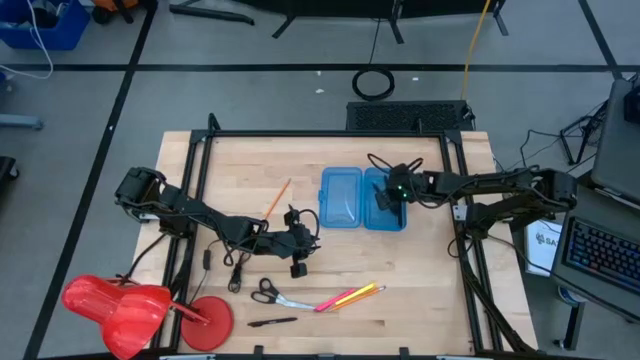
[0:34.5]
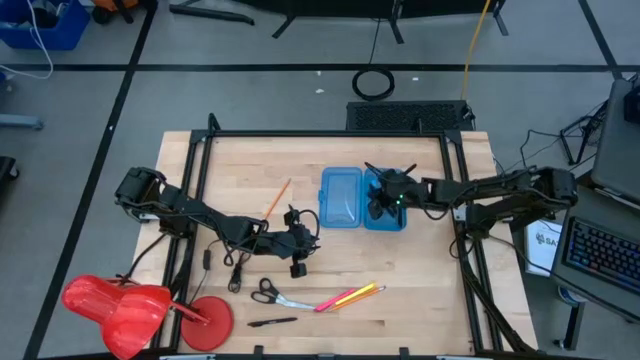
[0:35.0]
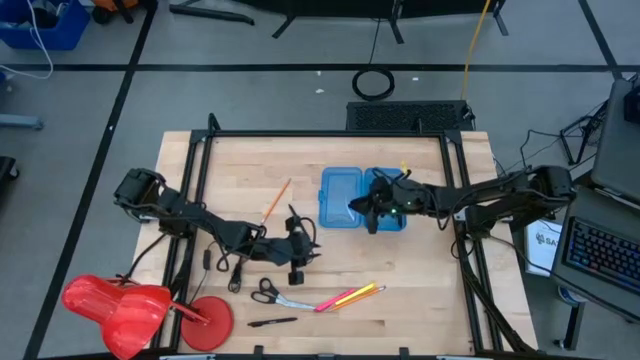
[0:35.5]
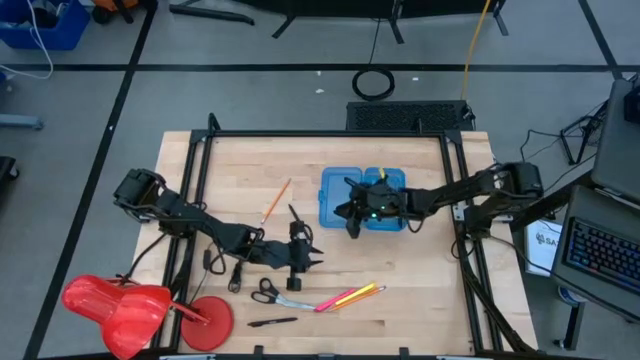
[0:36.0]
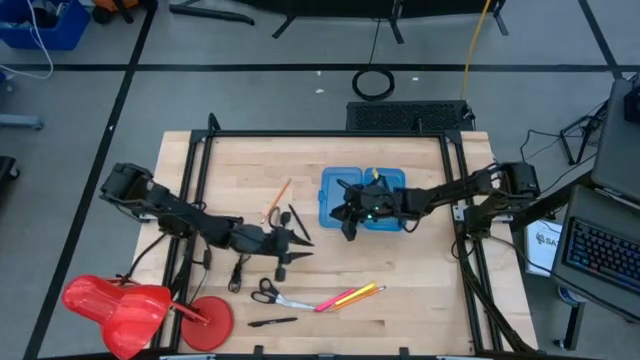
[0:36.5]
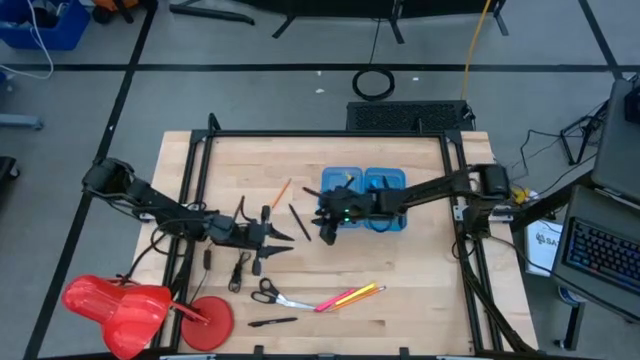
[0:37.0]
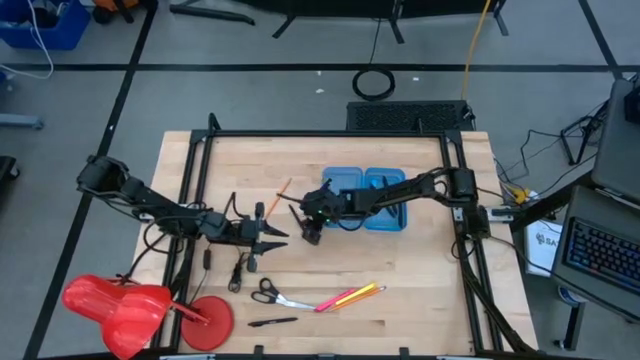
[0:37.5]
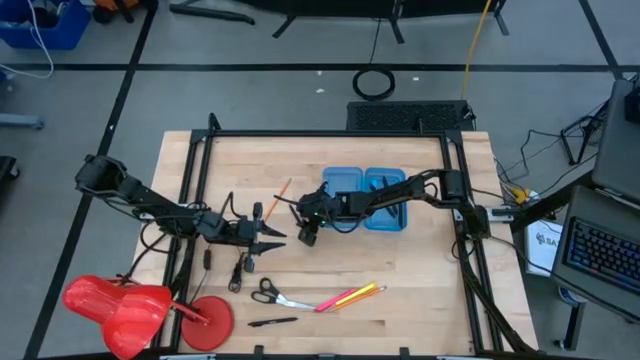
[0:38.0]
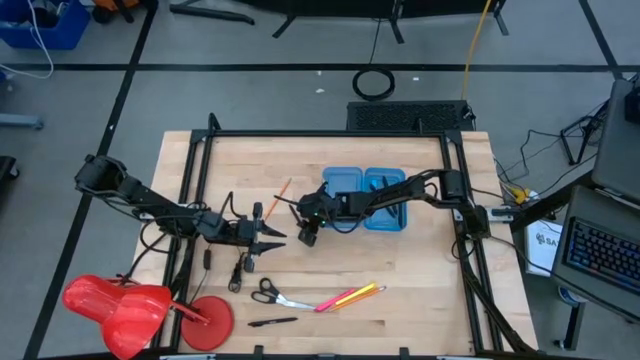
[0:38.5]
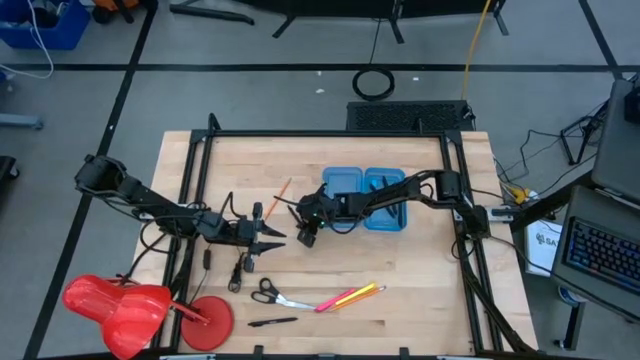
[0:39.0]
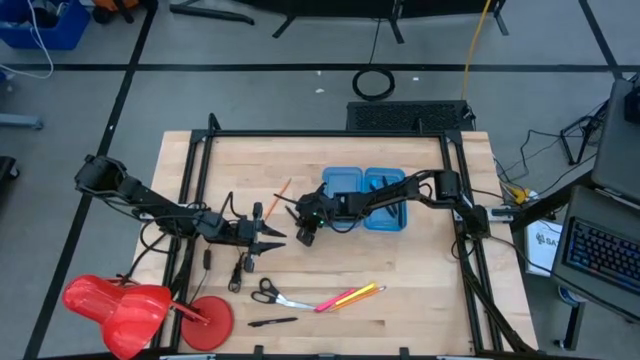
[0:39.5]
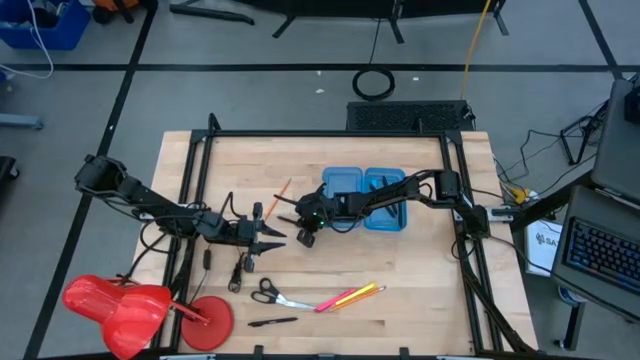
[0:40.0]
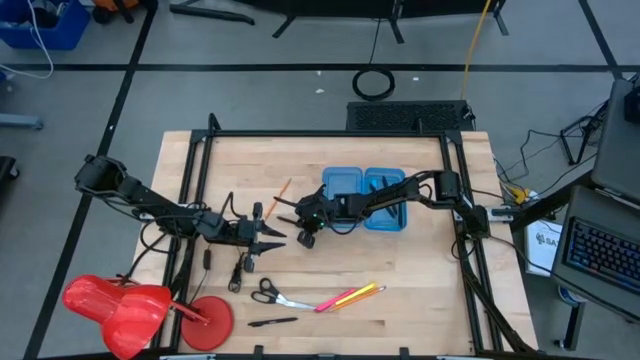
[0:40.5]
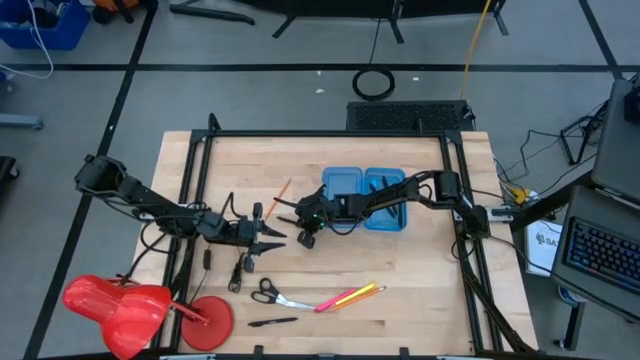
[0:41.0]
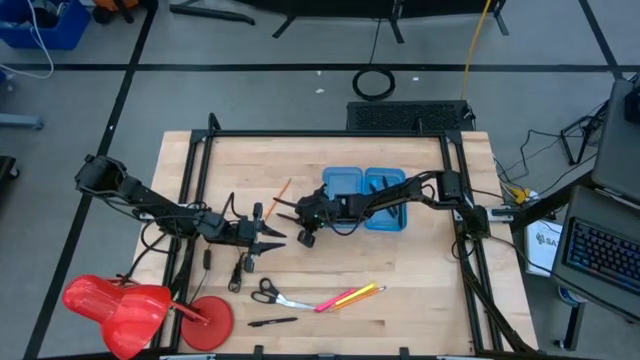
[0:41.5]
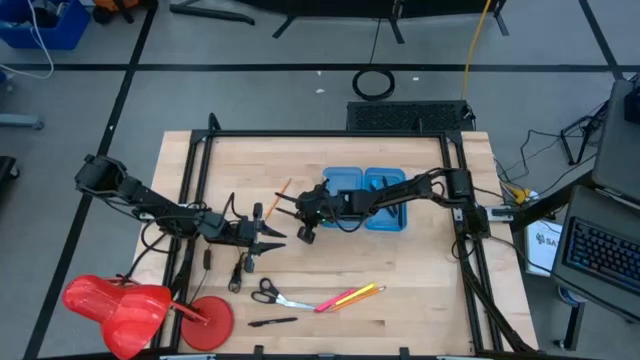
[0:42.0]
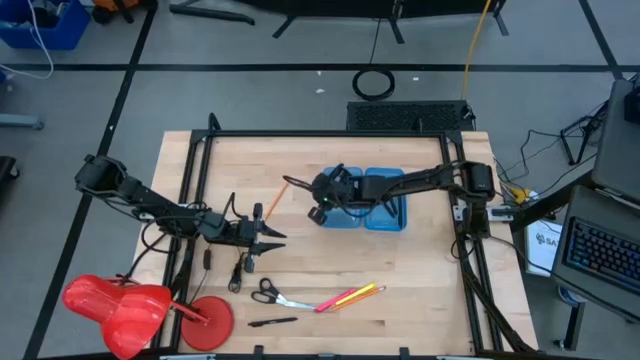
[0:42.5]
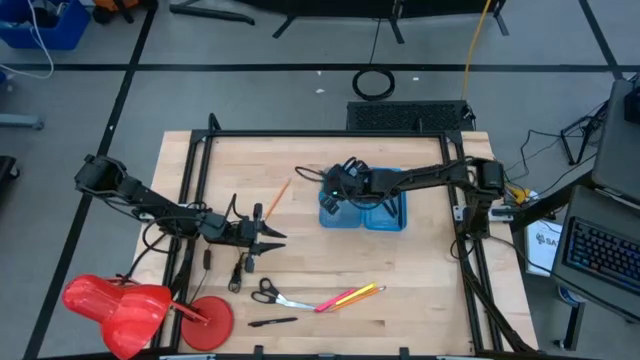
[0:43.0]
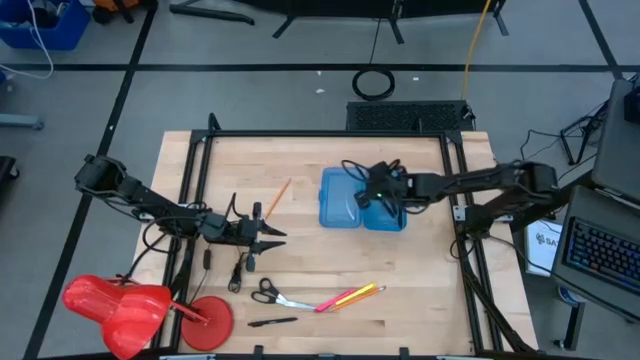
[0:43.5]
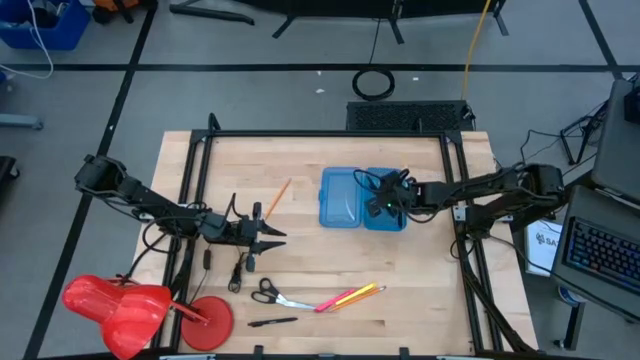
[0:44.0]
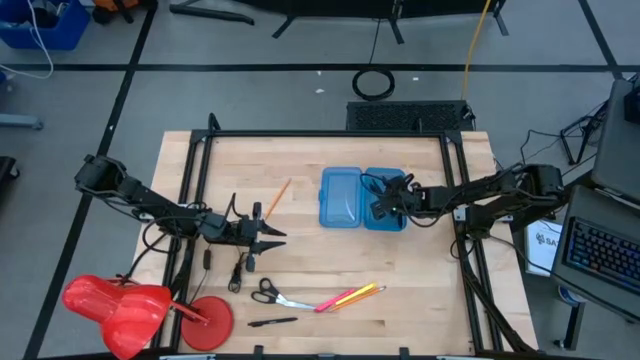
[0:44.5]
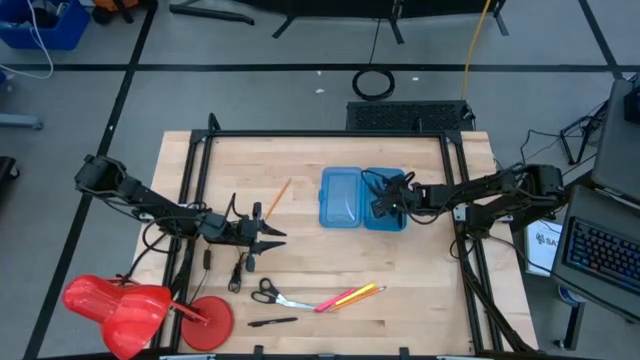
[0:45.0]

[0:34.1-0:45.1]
Task: Pick & place school supplies into a supply box
Put the black pen into the blue supply box

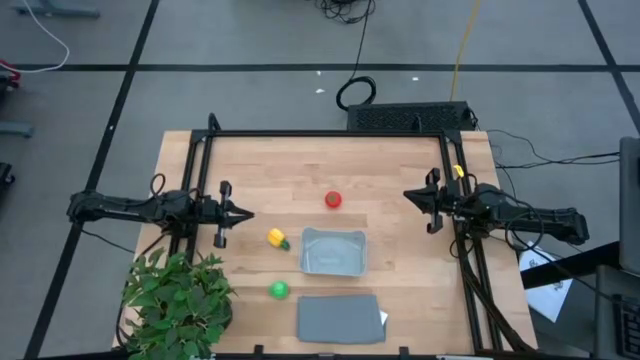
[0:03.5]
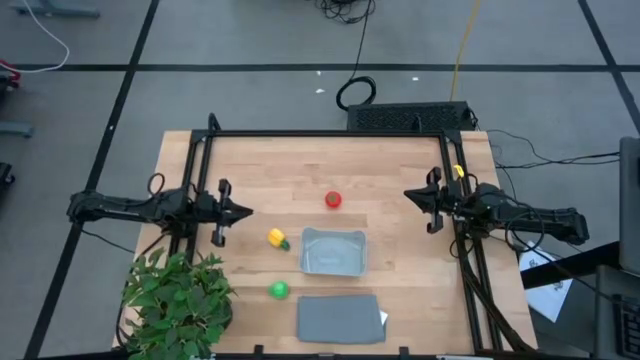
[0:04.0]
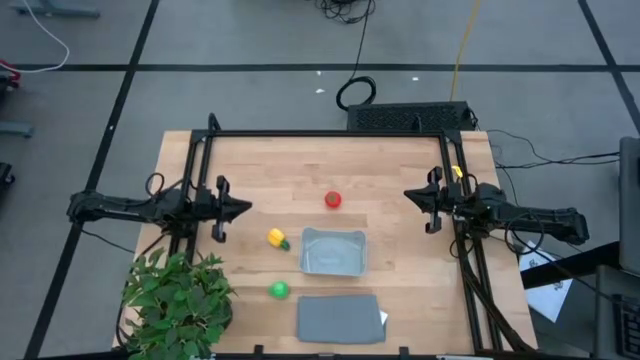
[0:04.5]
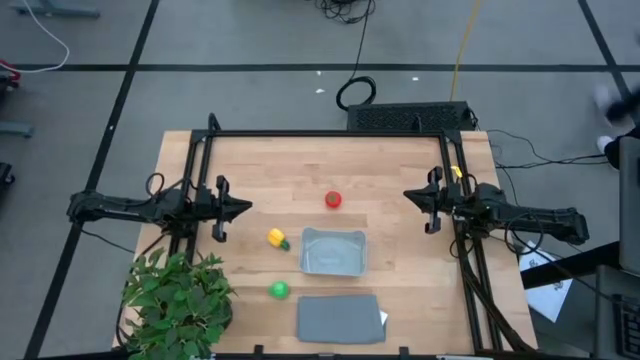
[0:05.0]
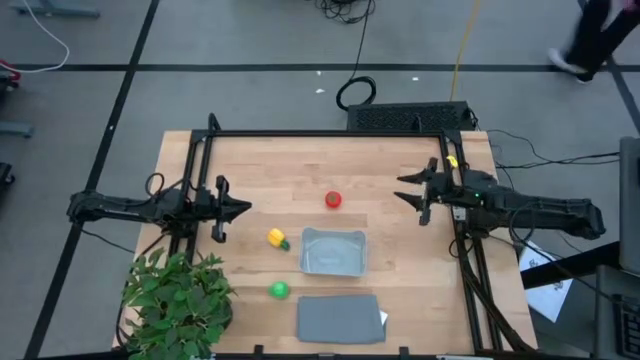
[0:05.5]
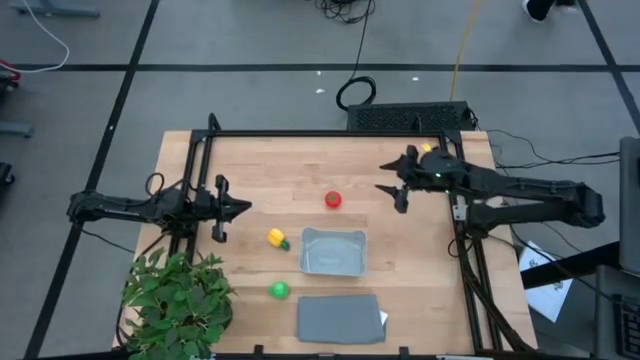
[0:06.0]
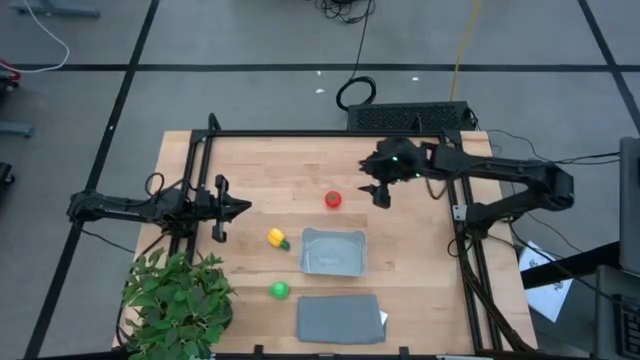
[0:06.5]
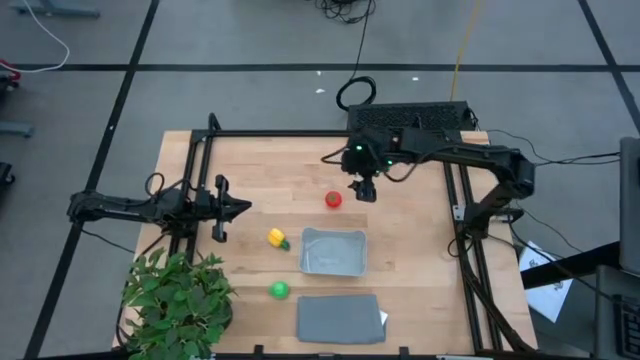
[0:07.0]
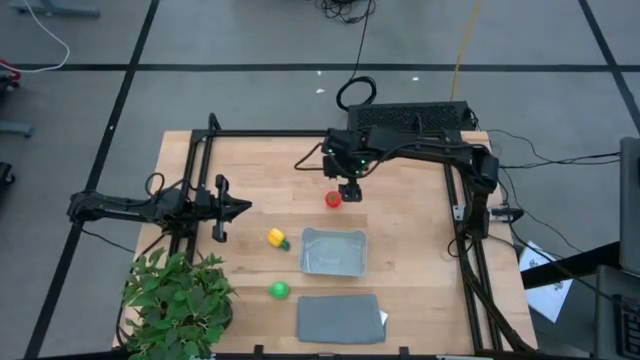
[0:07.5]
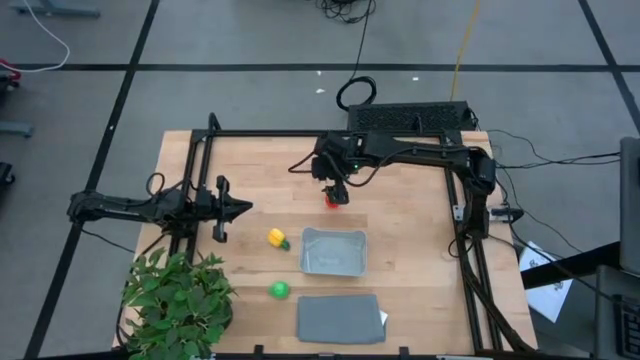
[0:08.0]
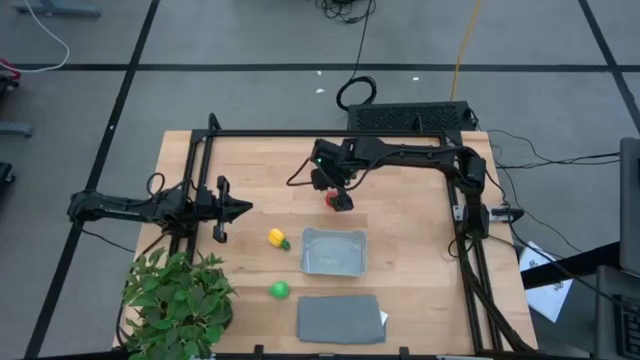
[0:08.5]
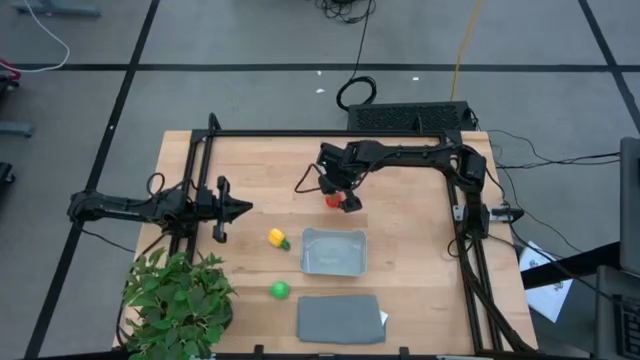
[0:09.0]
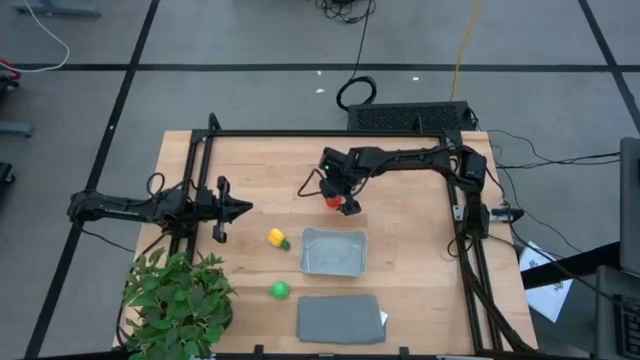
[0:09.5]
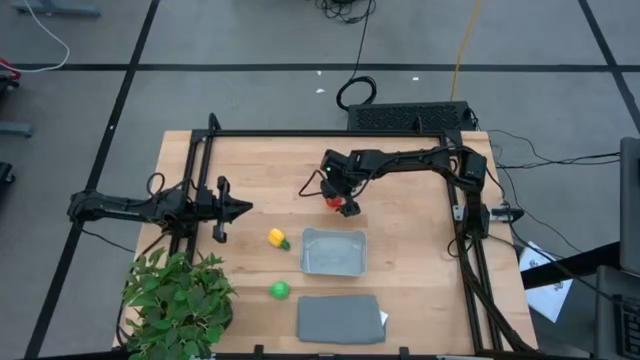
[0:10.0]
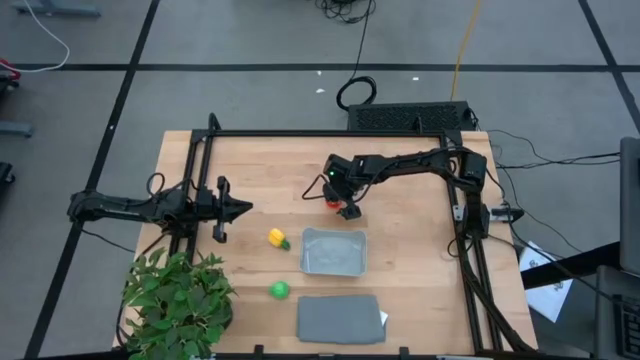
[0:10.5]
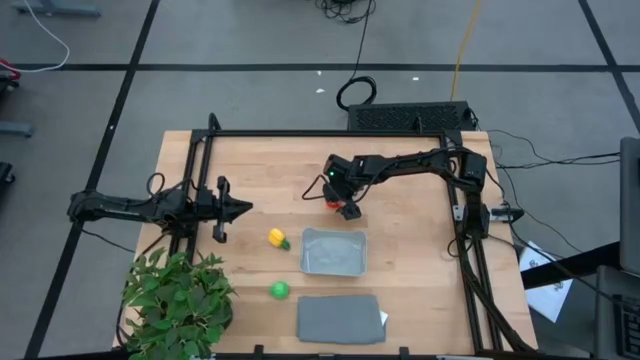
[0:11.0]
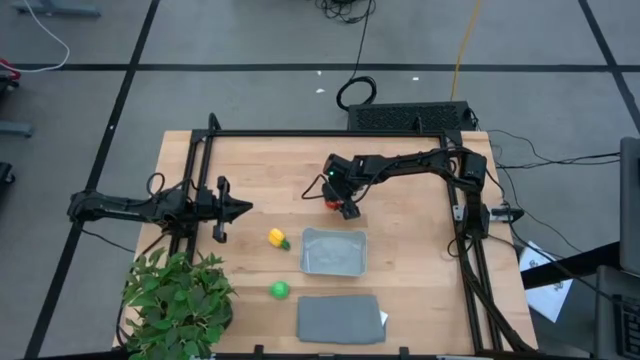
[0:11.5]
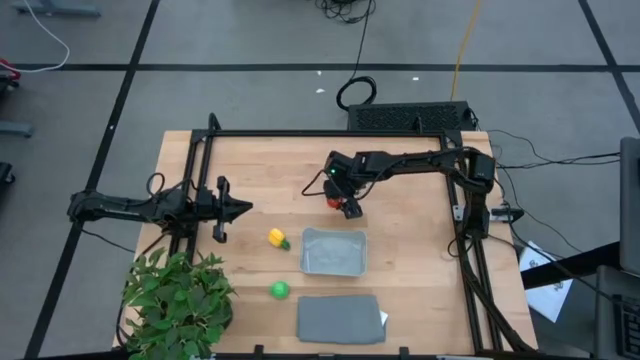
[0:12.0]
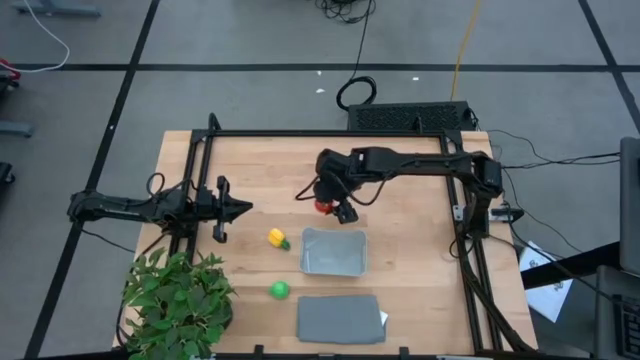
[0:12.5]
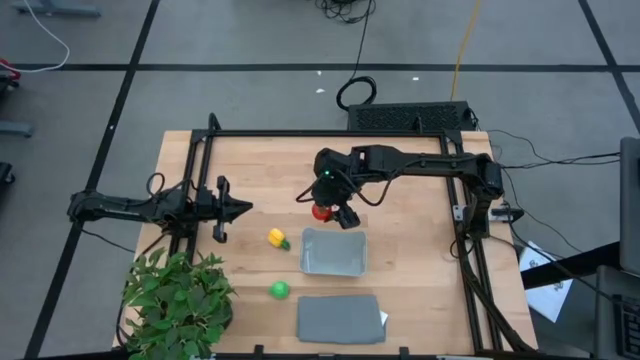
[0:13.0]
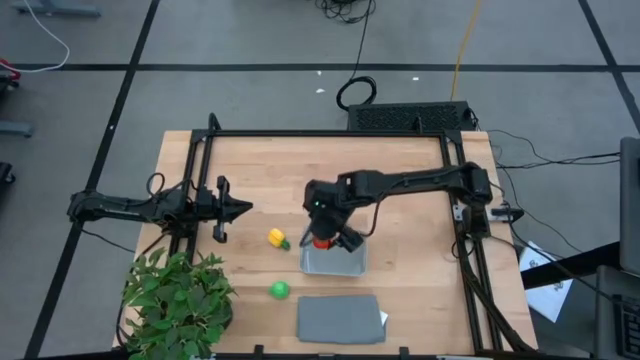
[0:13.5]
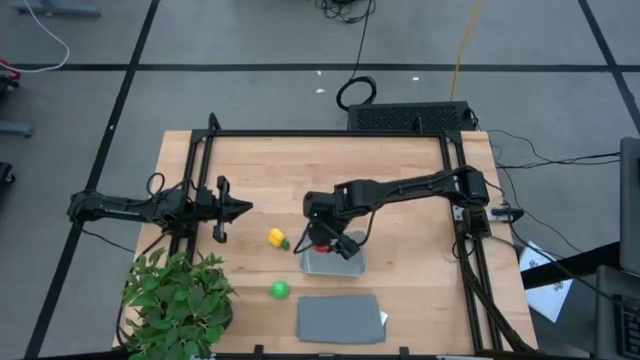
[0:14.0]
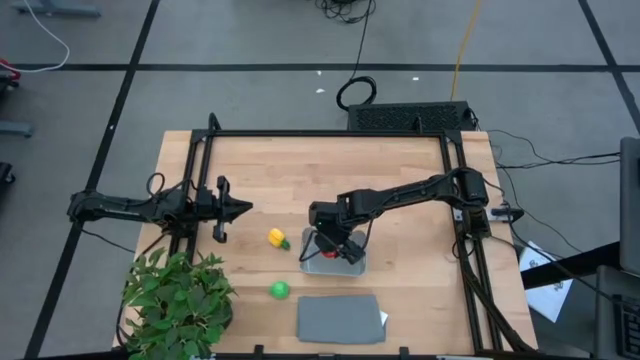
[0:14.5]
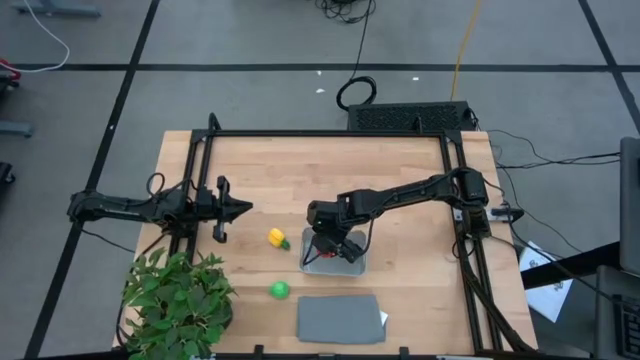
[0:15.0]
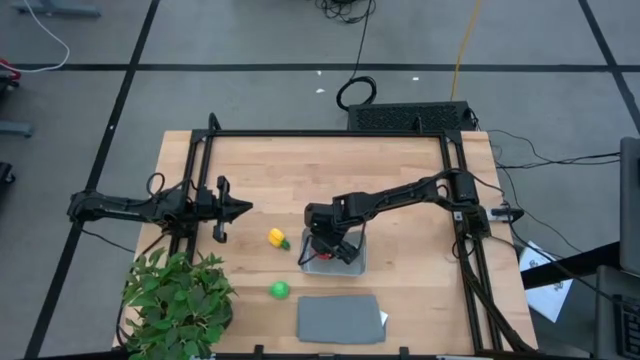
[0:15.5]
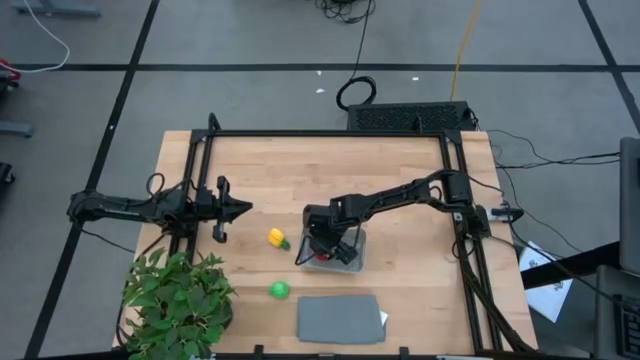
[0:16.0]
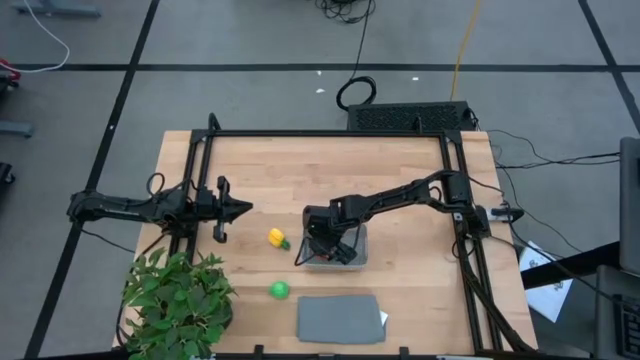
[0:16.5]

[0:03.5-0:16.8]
Task: Pick and placing Produce into tupperware
Put the red tomato into the gray bin
